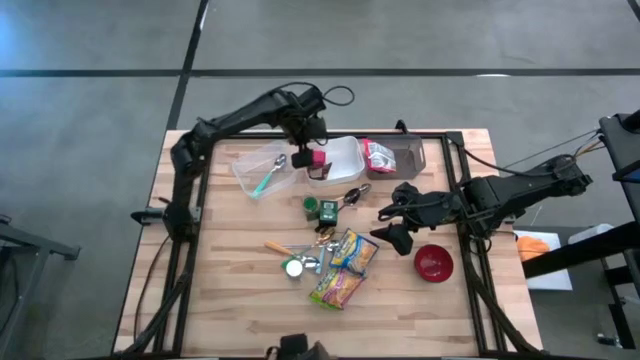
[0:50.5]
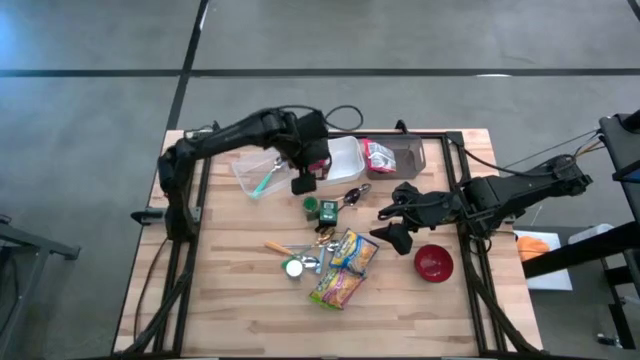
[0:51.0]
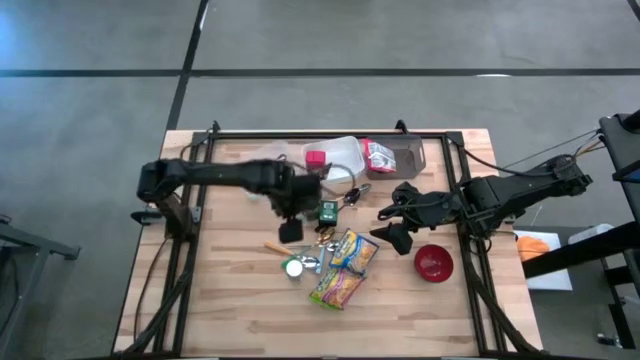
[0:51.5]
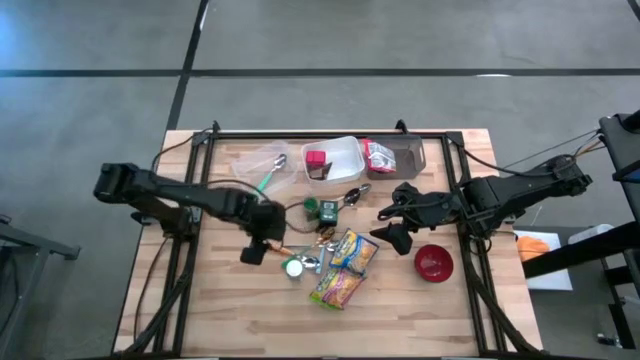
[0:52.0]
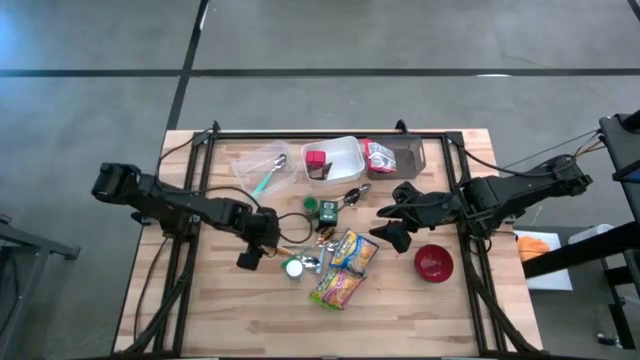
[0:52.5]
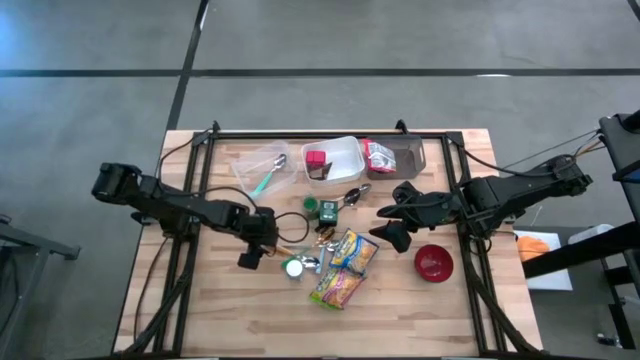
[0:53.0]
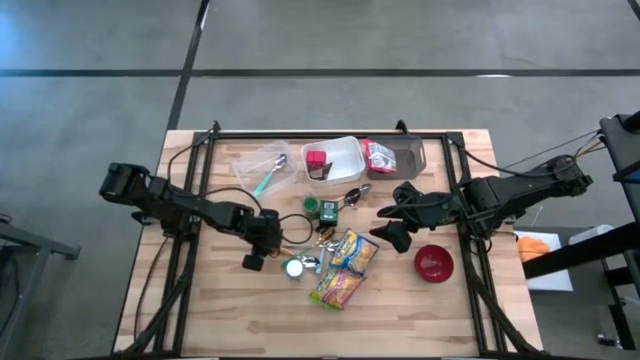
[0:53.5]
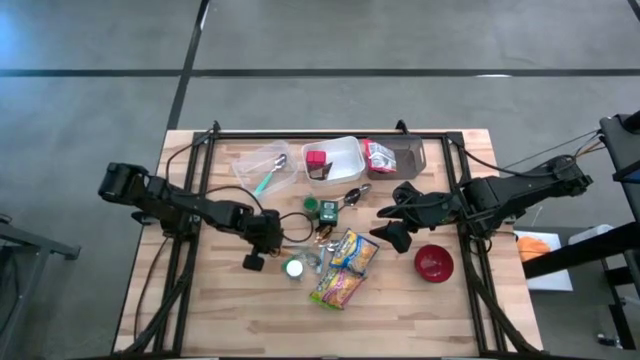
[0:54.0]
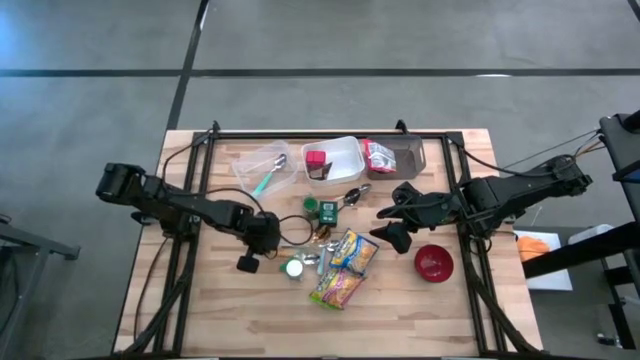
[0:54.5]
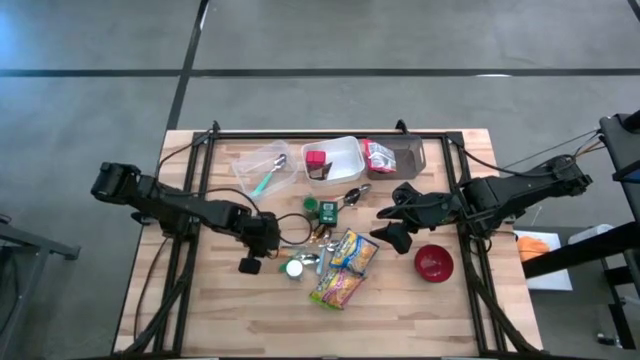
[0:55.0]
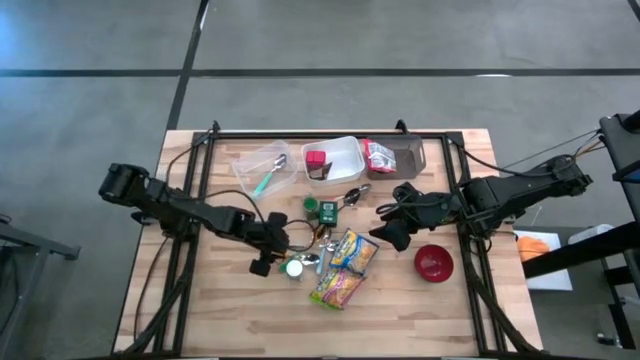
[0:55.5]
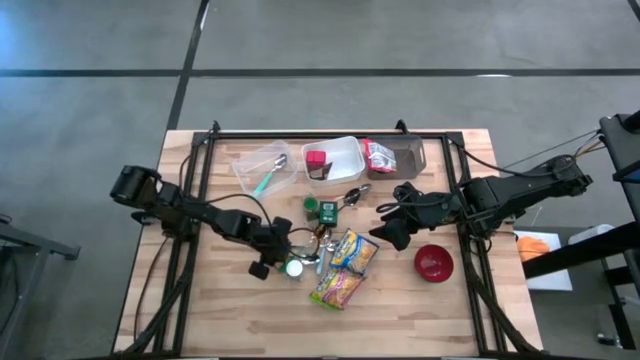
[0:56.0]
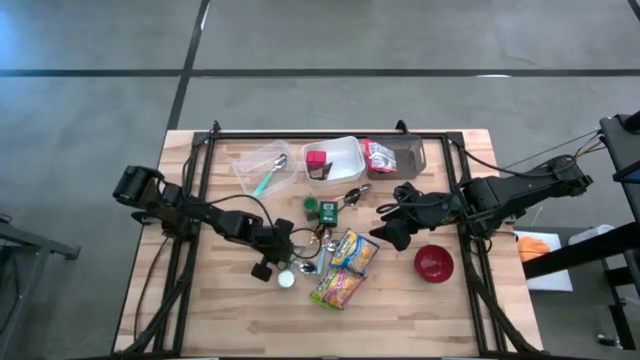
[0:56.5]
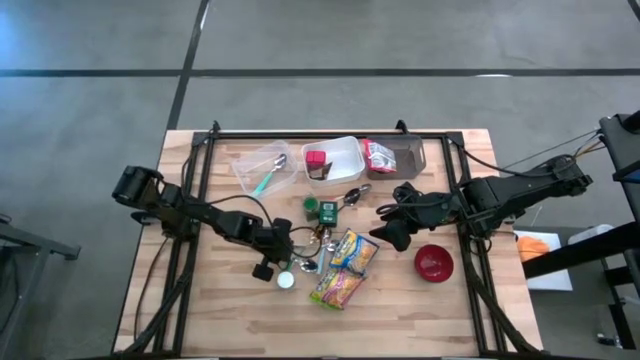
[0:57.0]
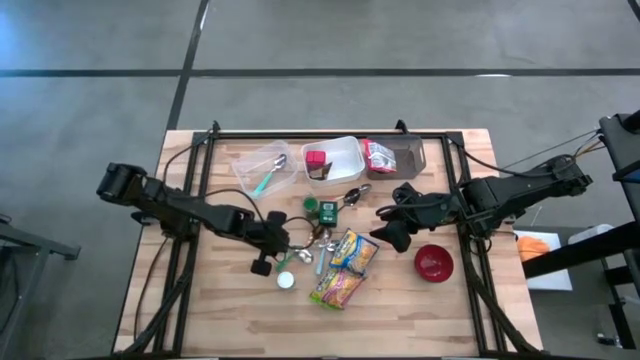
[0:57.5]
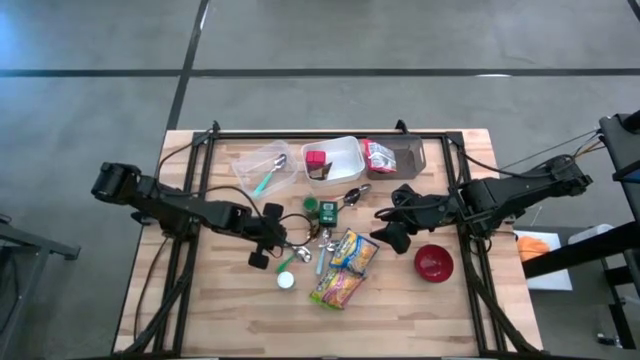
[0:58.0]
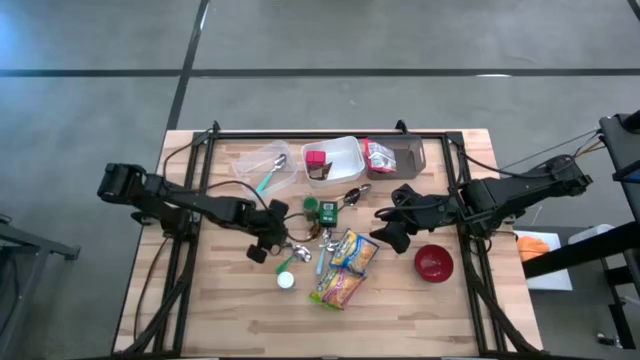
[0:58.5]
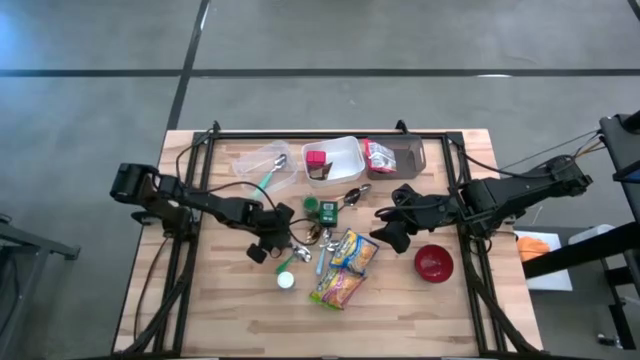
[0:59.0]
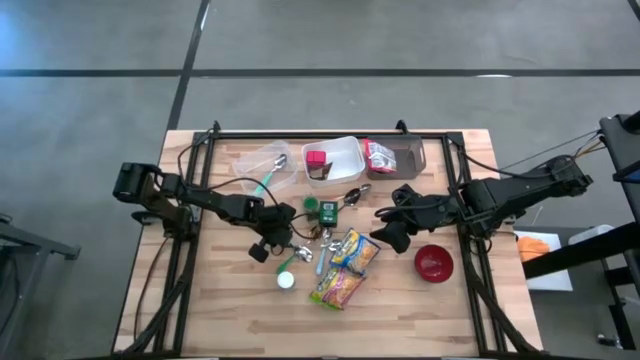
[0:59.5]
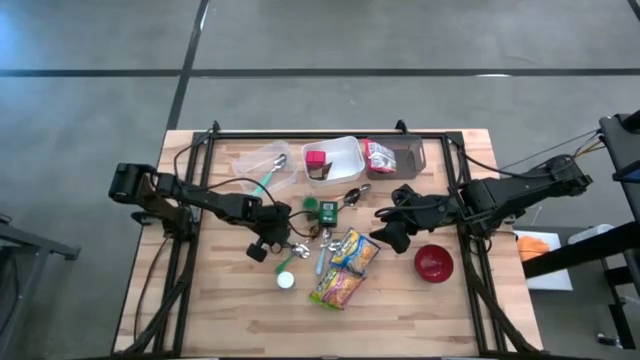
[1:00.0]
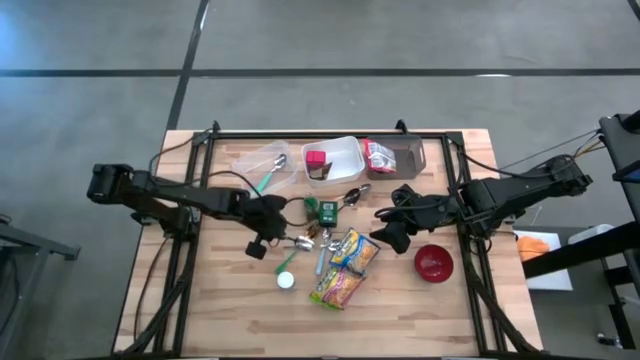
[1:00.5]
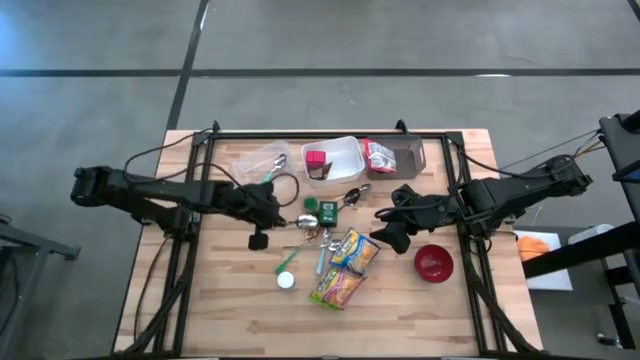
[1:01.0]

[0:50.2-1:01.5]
Put the yellow spoon into the transparent bin

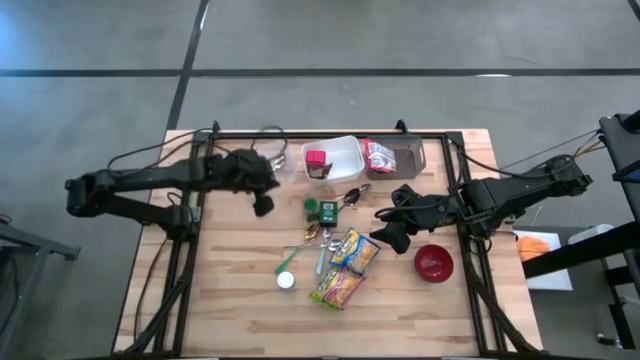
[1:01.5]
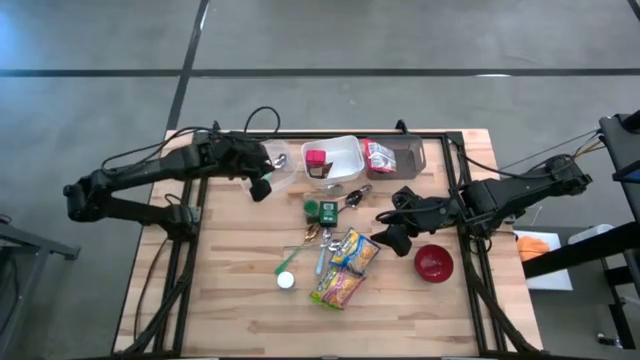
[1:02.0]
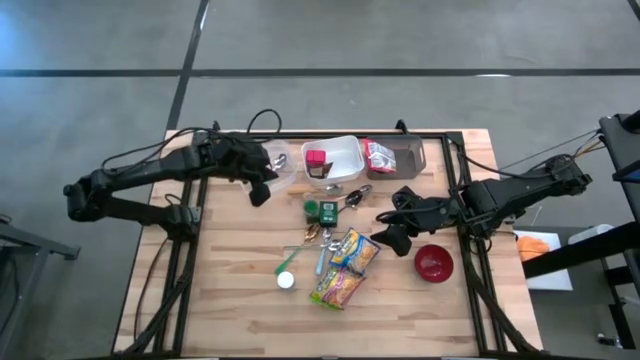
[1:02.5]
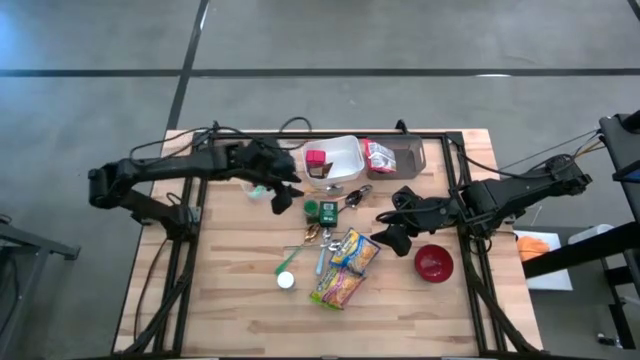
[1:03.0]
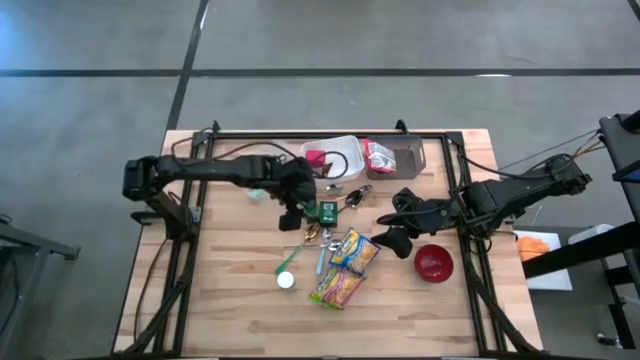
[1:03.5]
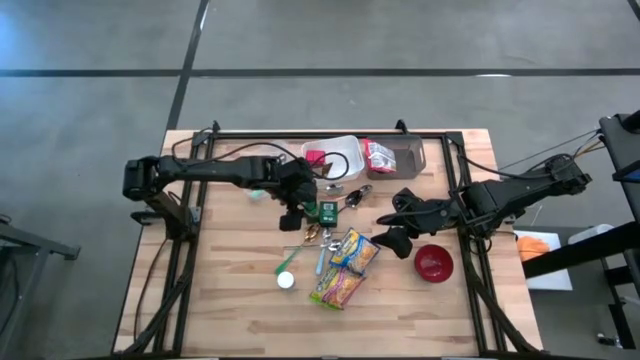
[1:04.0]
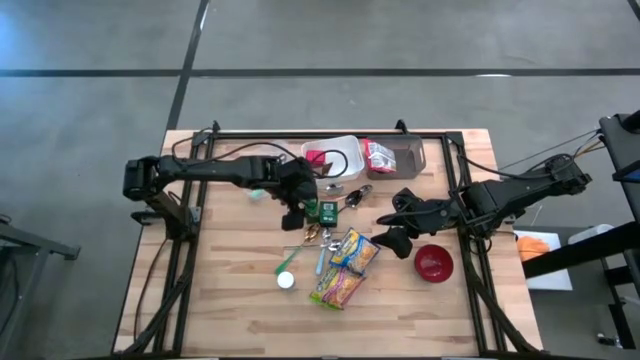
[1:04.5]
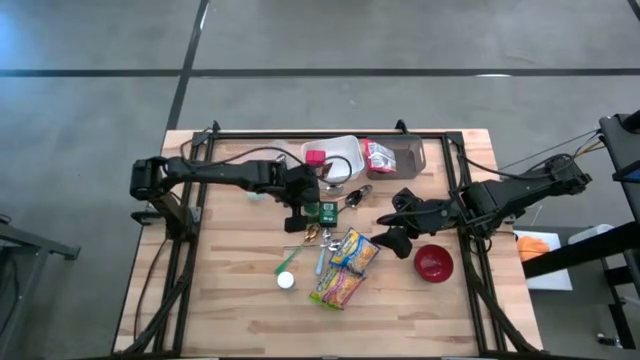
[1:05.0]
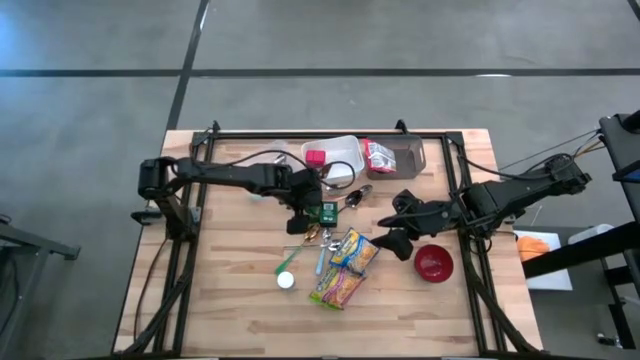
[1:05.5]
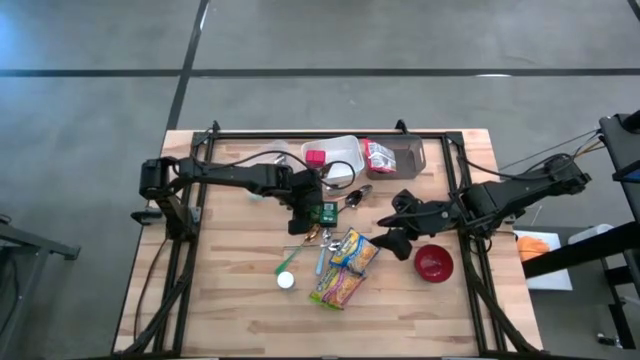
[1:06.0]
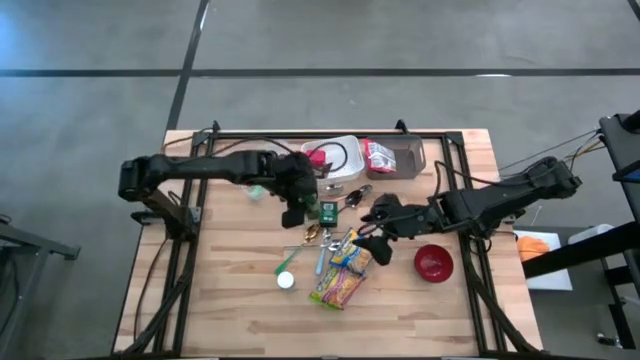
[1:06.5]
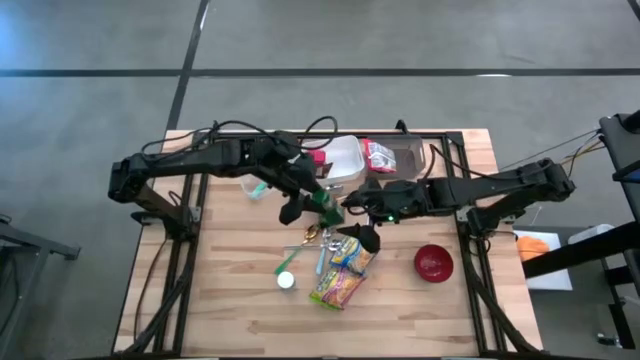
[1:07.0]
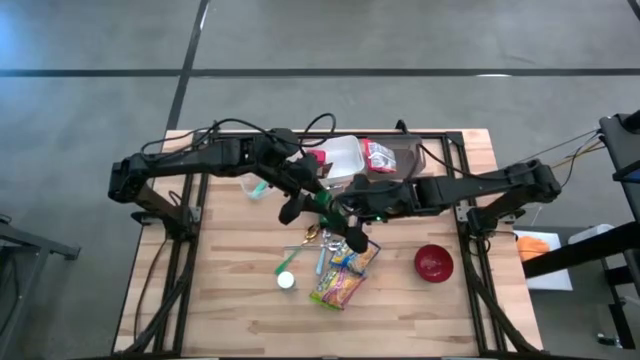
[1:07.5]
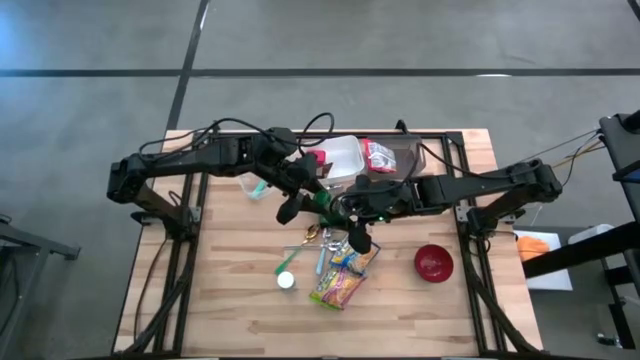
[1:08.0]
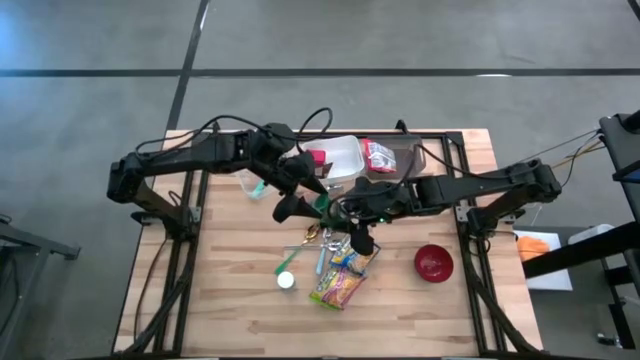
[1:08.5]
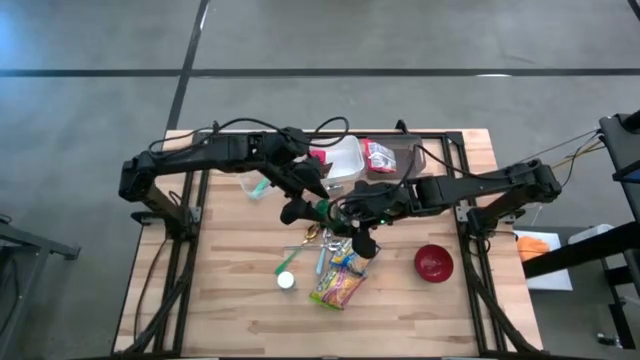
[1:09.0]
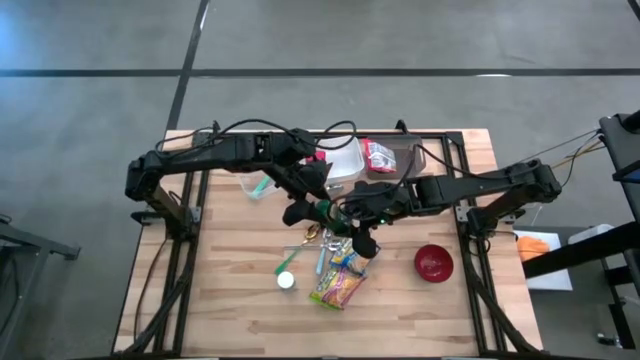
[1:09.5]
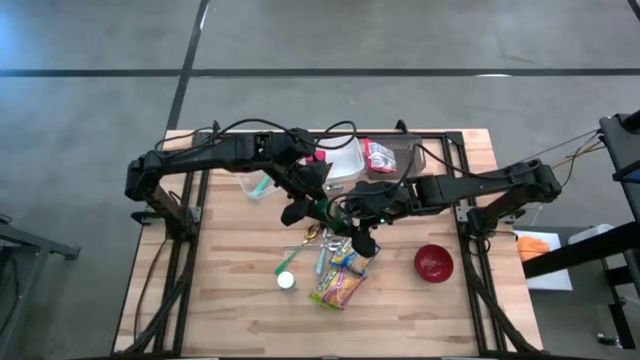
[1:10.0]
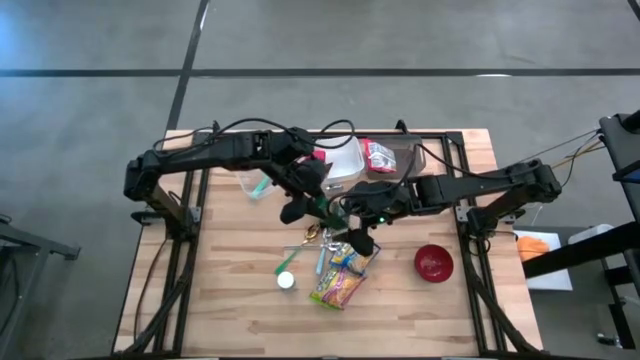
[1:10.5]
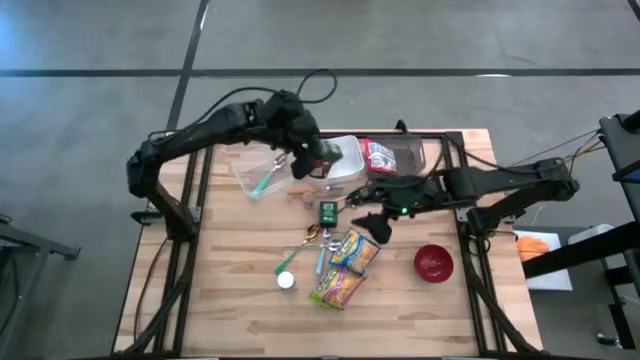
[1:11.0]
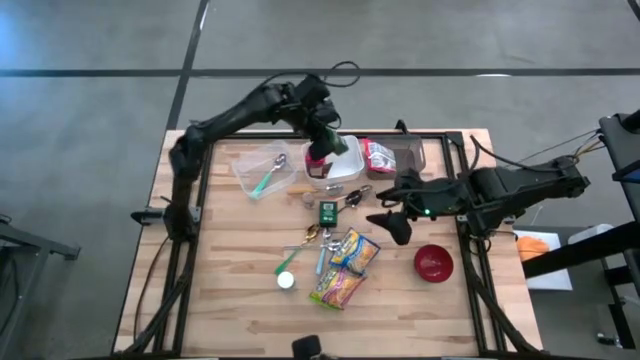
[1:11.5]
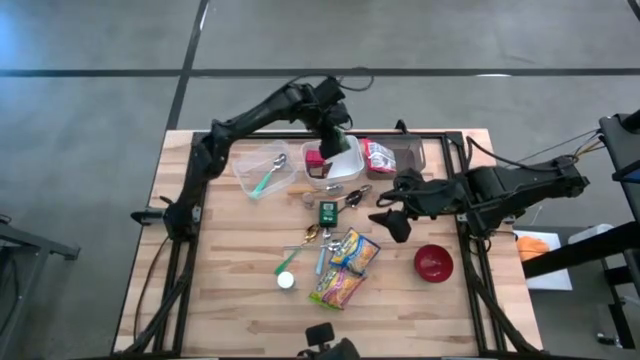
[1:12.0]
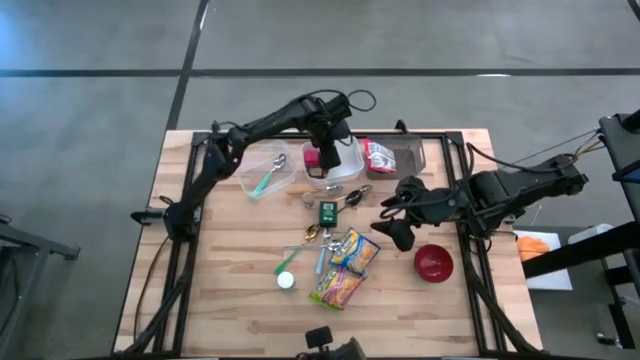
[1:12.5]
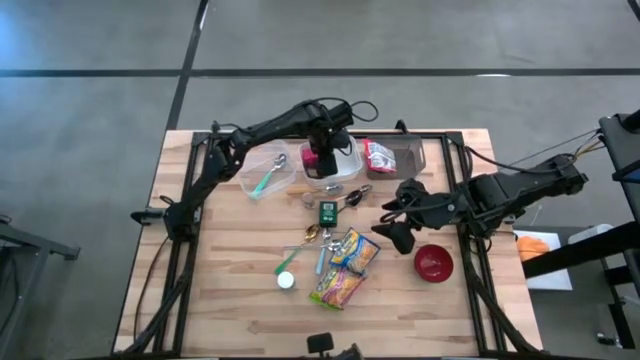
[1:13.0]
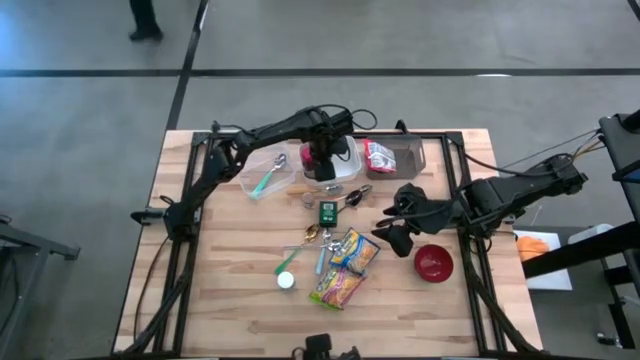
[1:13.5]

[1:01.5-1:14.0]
Put the green seasoning bottle into the white bin
